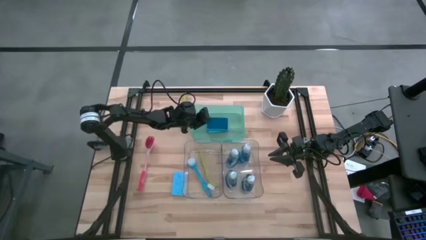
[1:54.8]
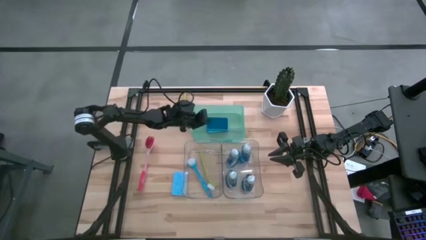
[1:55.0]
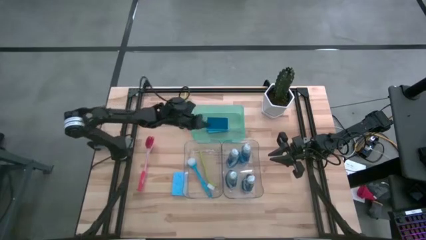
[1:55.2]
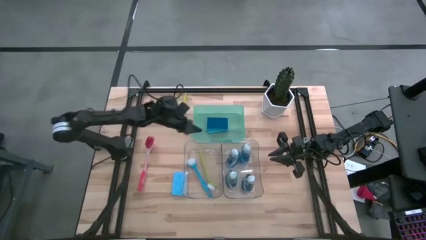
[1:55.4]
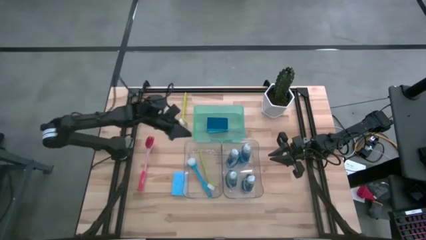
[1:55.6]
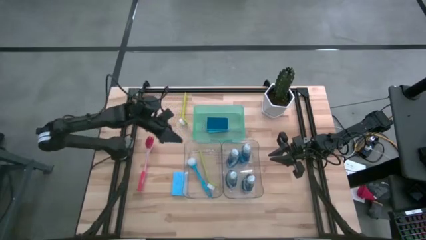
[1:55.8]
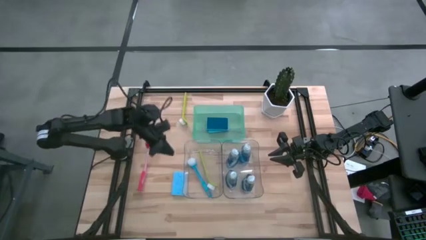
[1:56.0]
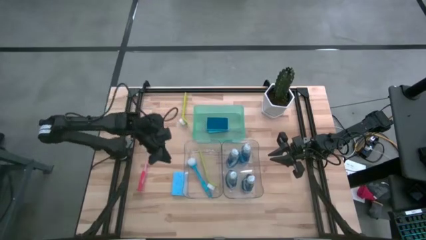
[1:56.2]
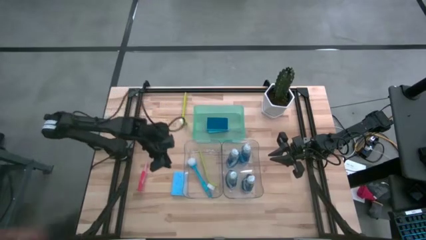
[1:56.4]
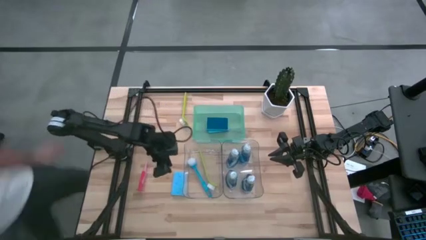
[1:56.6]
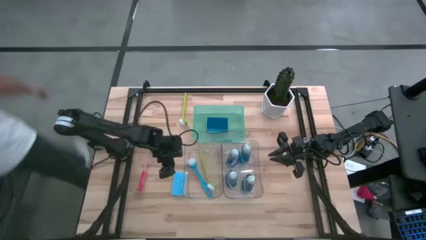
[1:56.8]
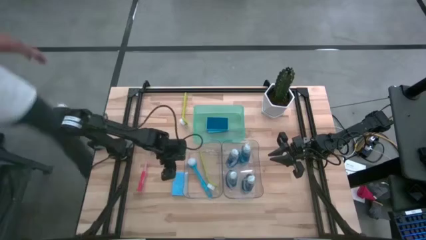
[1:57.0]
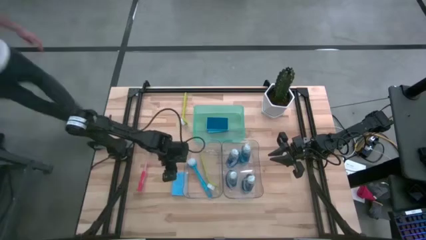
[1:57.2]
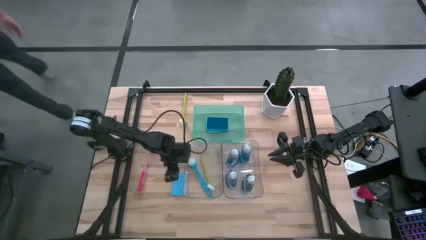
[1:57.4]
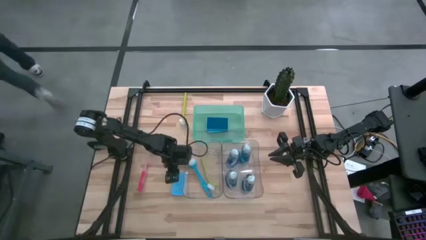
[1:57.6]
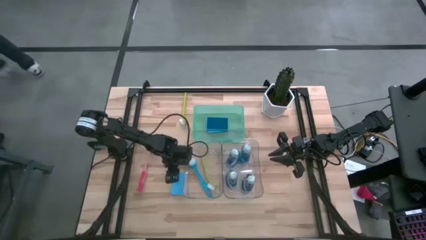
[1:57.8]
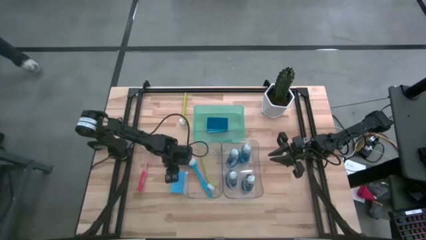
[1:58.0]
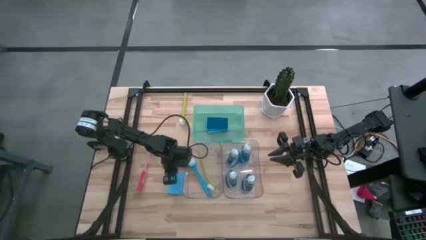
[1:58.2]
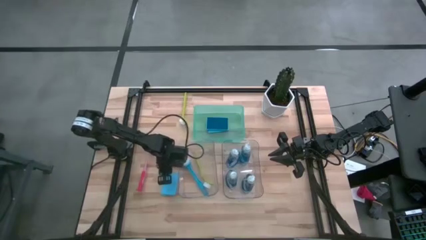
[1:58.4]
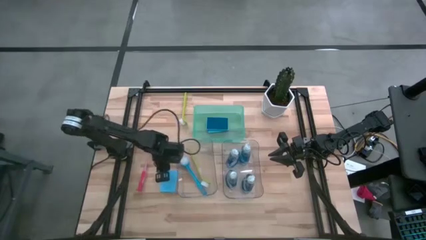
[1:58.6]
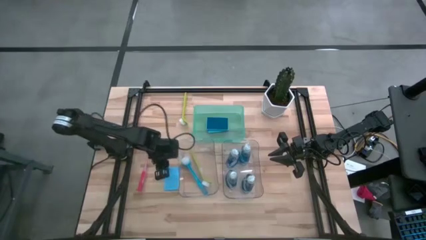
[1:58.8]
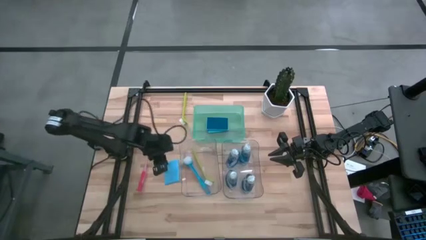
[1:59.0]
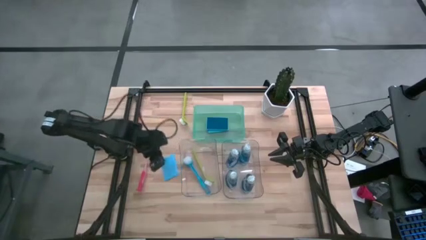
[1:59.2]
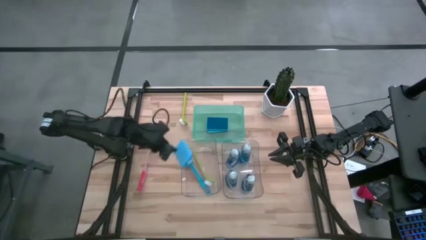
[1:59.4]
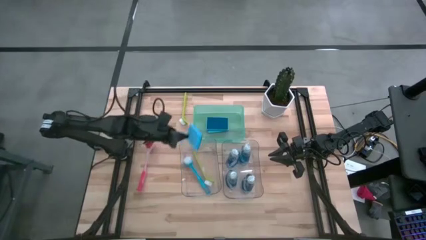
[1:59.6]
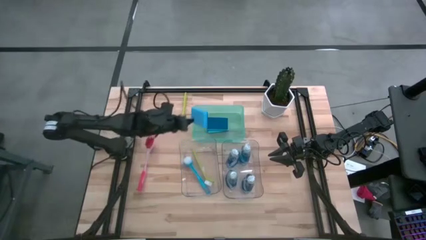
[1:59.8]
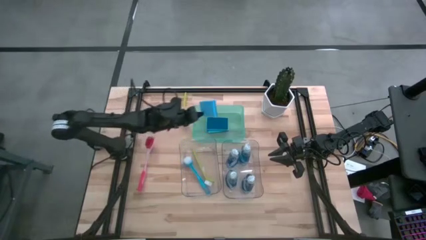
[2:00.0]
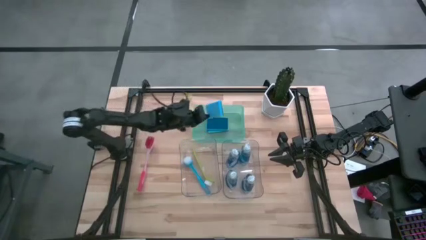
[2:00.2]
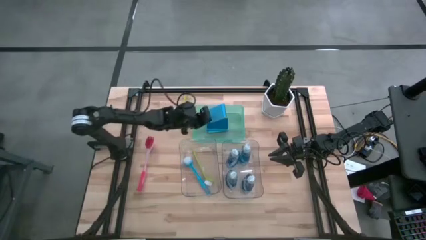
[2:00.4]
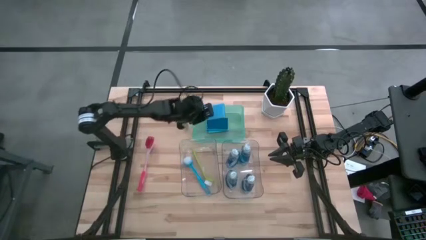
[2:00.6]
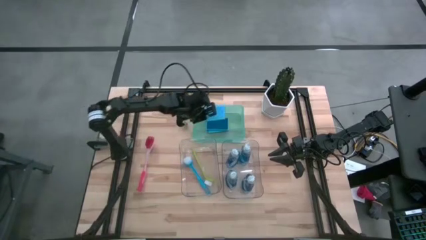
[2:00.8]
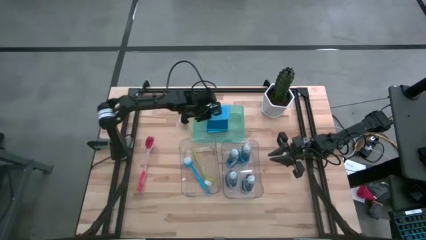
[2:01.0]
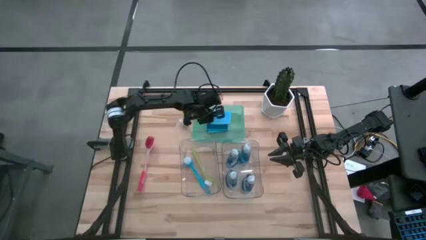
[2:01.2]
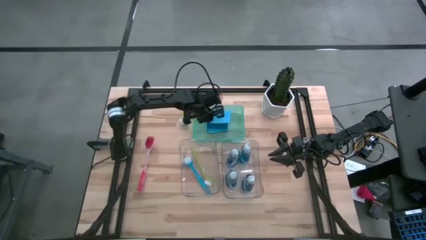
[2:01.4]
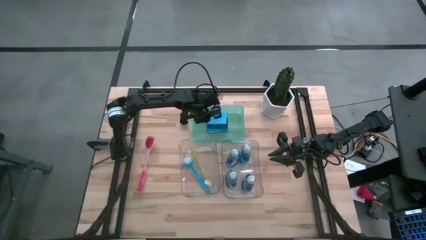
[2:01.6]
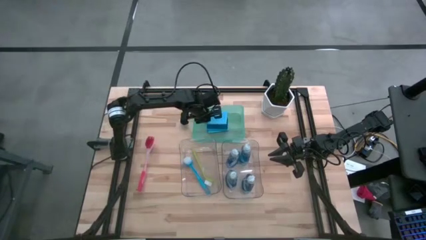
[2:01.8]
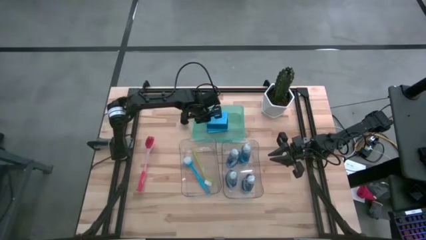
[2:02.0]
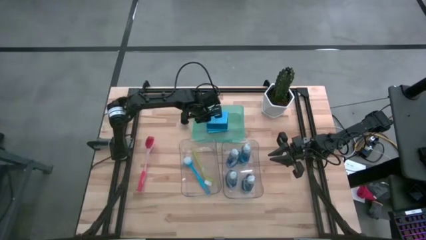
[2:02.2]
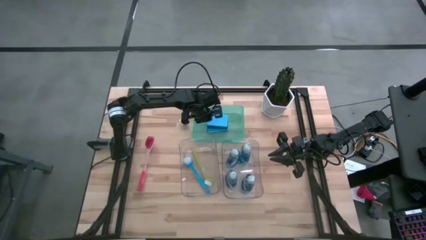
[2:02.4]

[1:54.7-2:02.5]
Task: Pick & Place Kitchen Sink Supplies
Put the blue sponge into the green bin

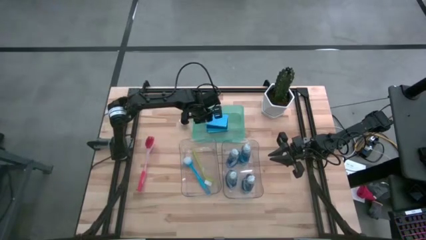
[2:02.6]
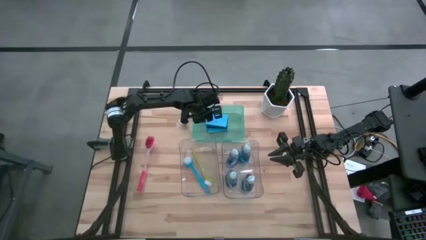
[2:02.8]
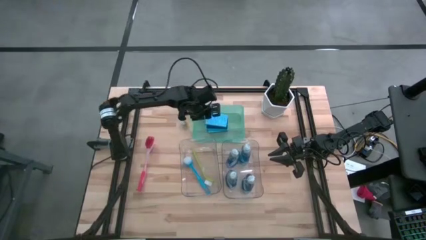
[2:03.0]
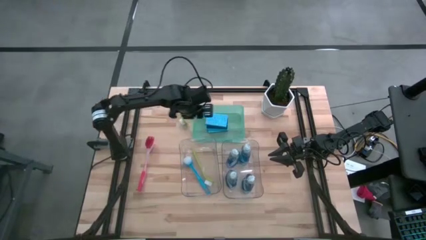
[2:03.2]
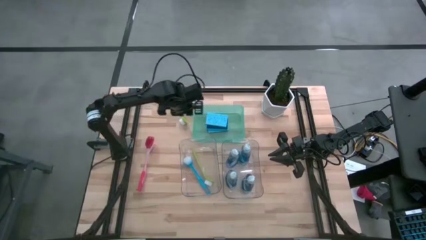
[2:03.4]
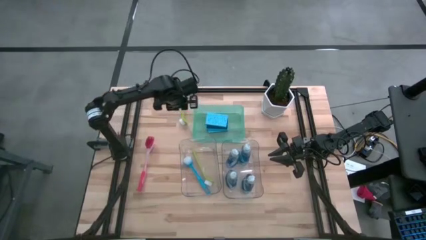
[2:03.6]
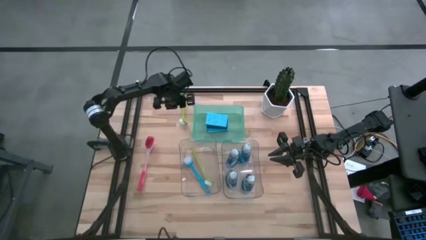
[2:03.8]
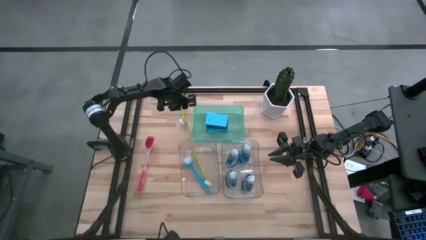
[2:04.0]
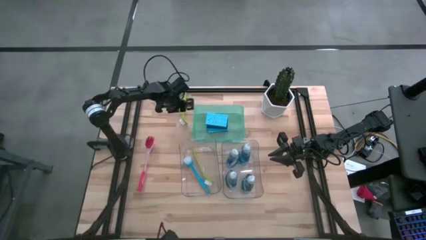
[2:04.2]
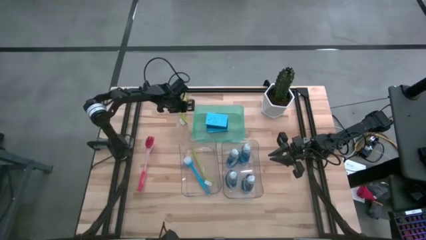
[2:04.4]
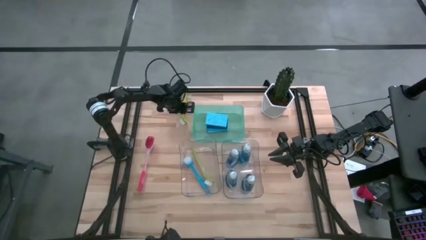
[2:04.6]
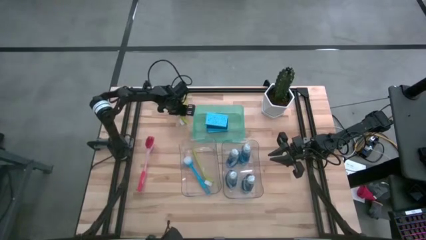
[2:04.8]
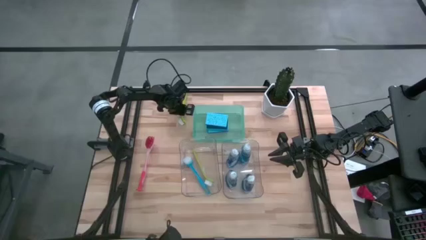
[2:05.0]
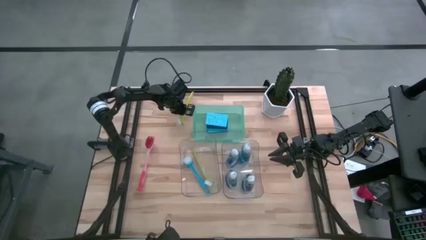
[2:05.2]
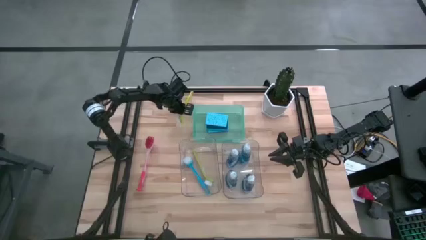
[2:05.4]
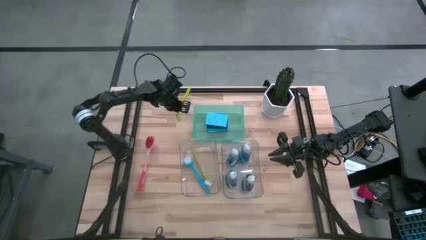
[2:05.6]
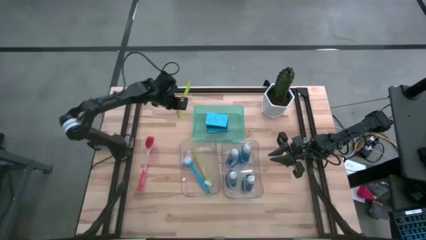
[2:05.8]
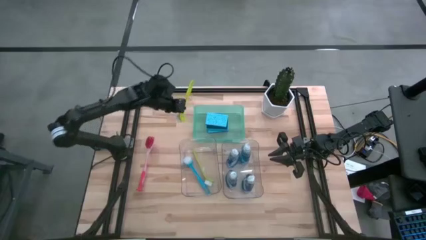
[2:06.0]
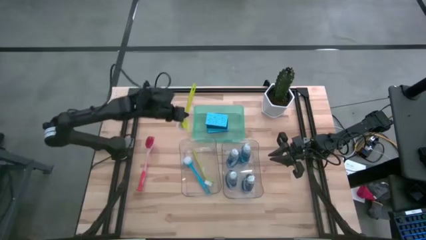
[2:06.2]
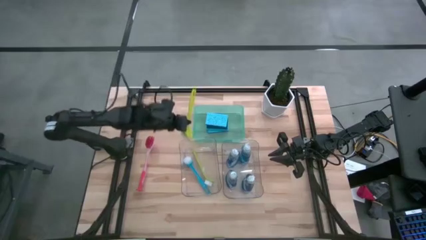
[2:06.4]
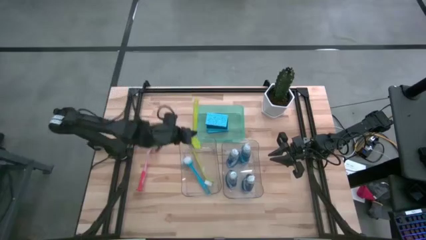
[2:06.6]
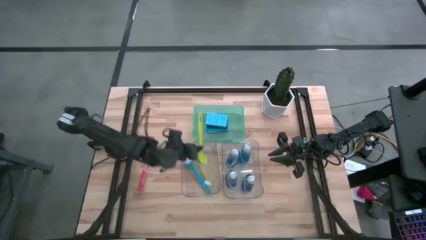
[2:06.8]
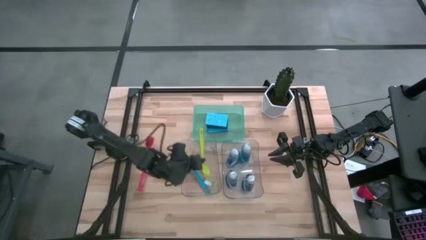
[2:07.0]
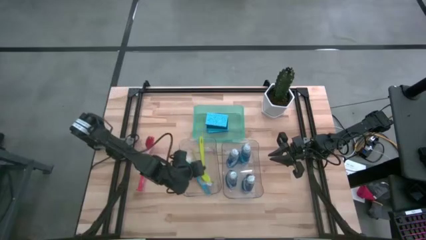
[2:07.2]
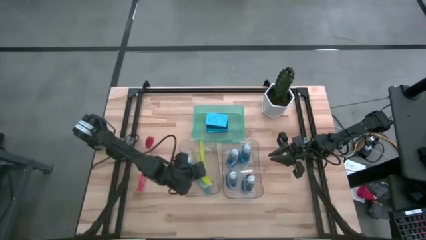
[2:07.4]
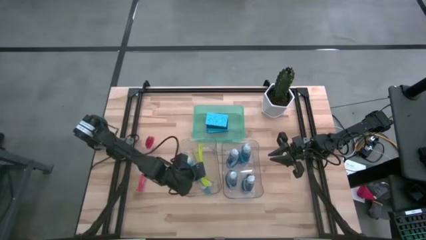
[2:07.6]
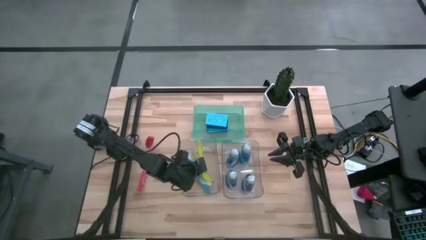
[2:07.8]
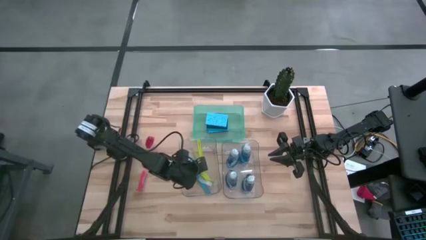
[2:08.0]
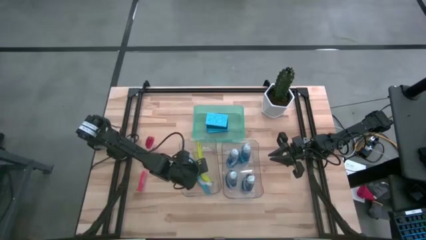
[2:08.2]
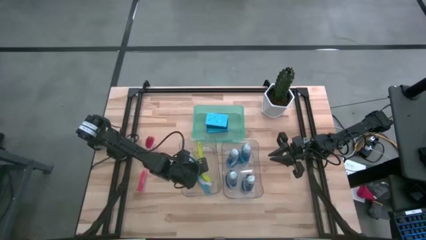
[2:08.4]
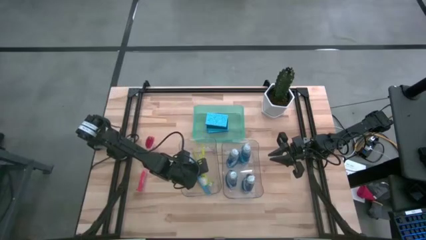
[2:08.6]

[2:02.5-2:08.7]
Put the yellow toilet brush into the left transparent bin

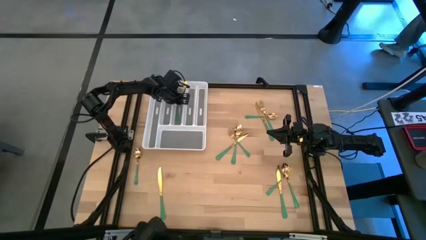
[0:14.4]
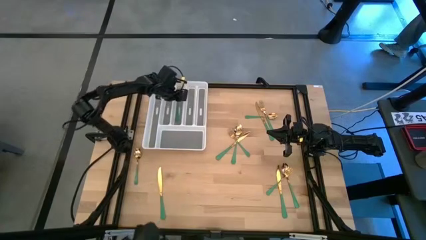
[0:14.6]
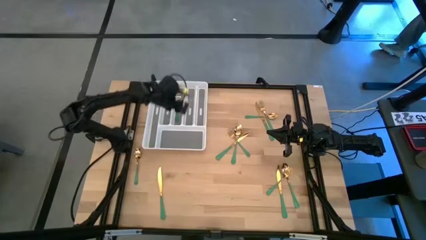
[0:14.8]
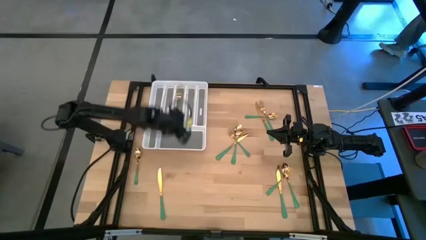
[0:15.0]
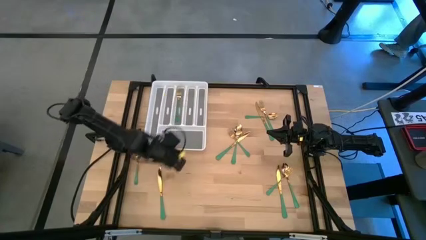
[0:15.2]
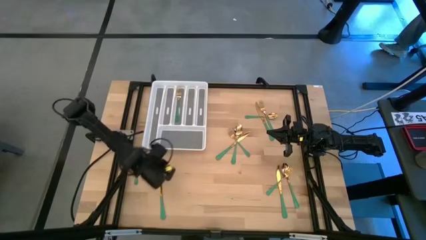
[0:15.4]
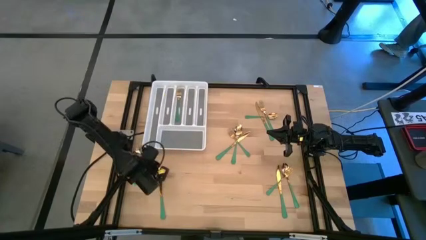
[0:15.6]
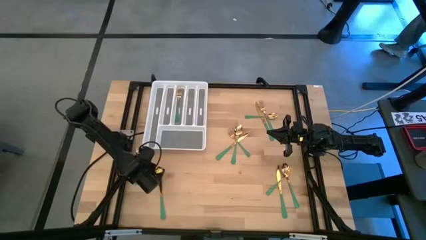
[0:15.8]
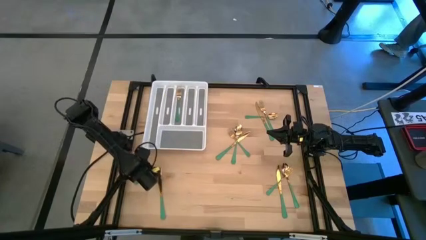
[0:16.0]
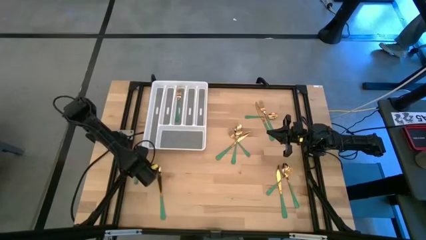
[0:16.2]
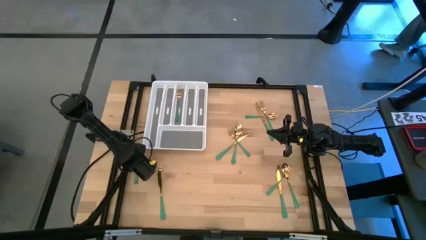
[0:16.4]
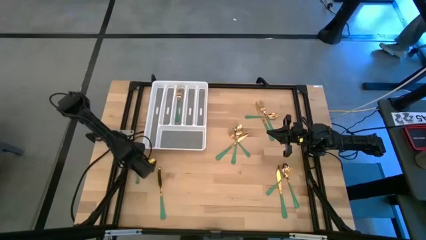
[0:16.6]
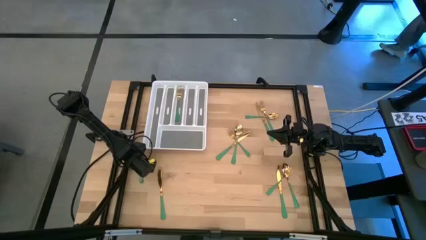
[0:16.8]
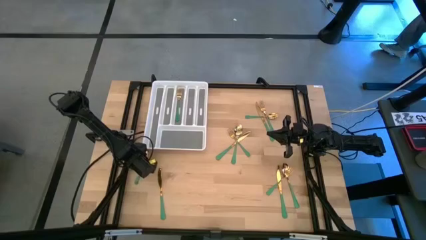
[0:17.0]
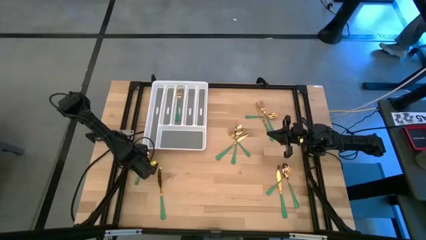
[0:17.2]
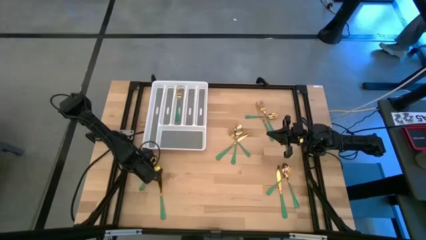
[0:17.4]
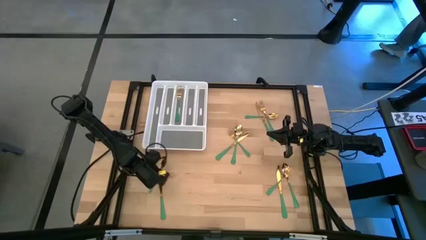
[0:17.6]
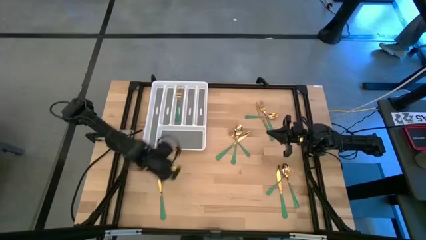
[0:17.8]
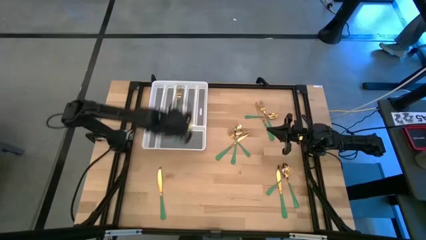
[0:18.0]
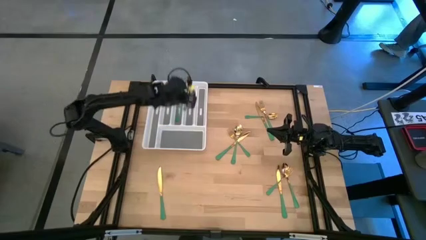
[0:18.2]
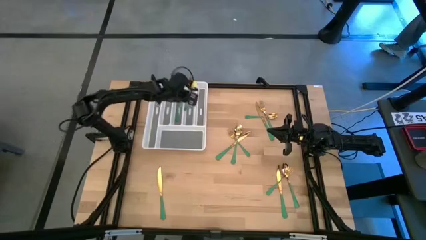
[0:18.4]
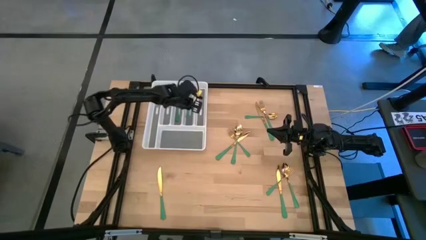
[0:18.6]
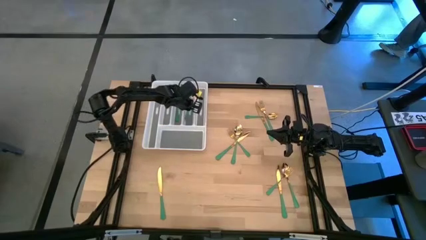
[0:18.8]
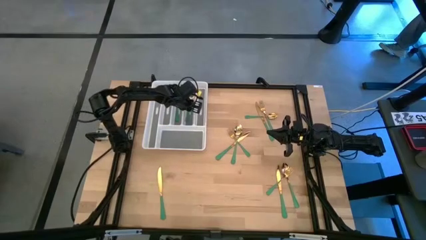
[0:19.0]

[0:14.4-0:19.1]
Task: Sort silverware
Put the green spoon into the white cutlery tray
